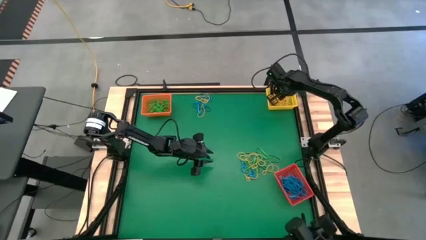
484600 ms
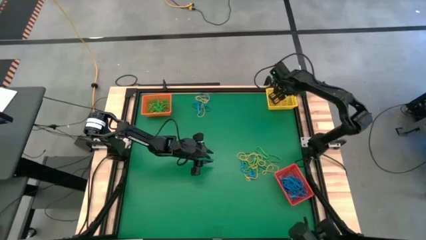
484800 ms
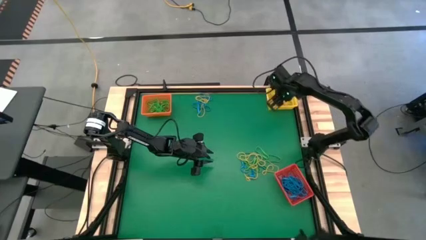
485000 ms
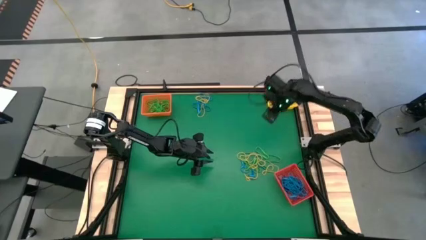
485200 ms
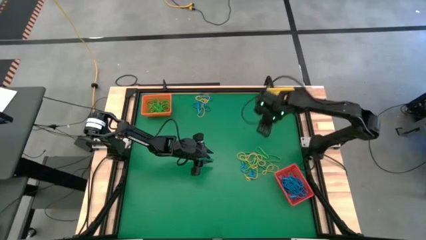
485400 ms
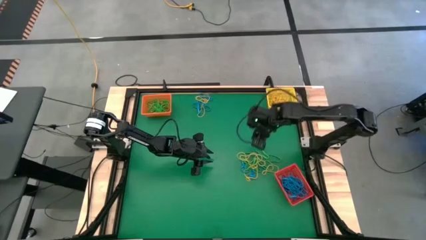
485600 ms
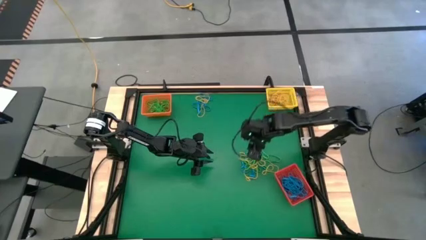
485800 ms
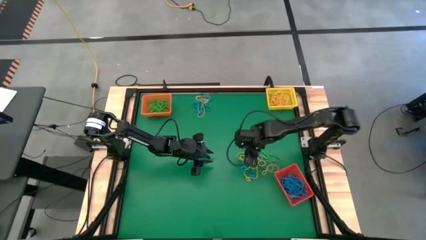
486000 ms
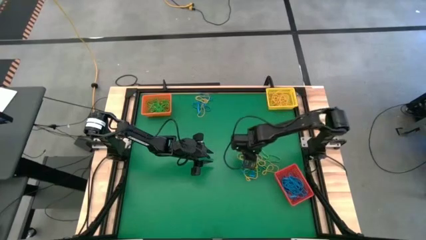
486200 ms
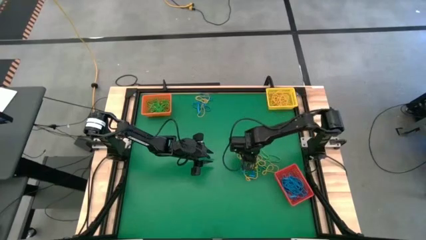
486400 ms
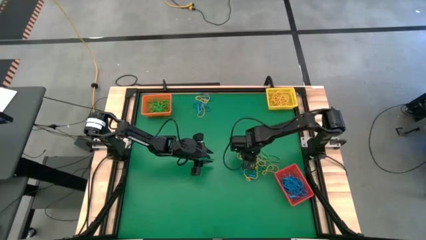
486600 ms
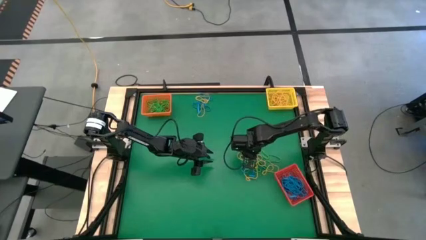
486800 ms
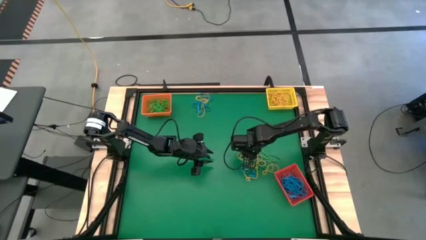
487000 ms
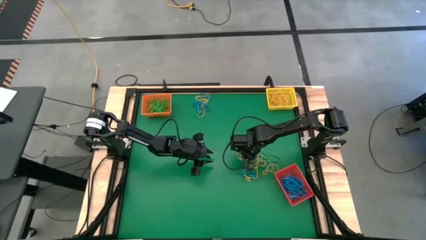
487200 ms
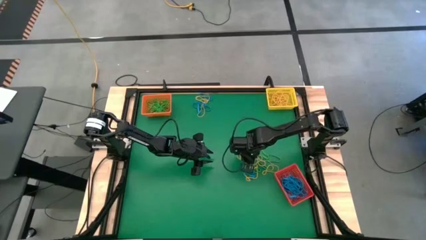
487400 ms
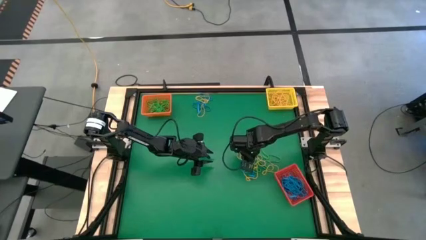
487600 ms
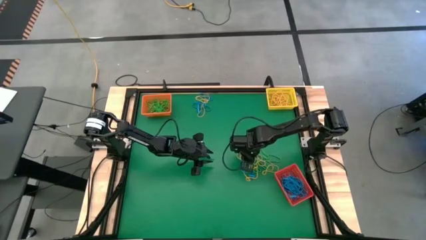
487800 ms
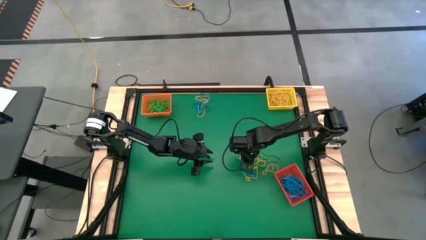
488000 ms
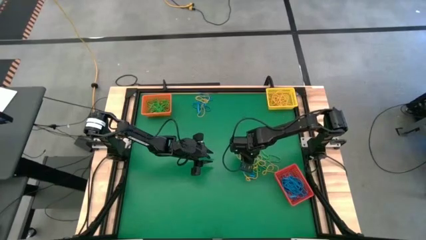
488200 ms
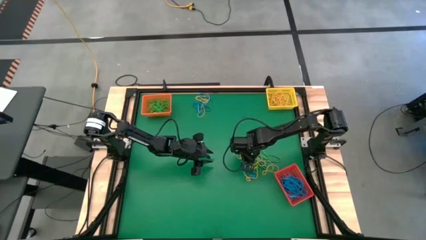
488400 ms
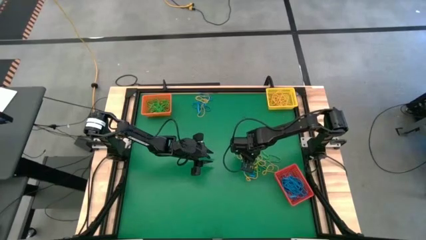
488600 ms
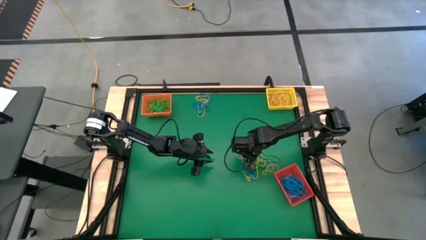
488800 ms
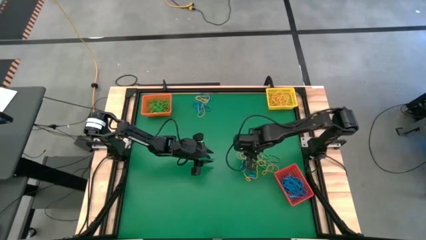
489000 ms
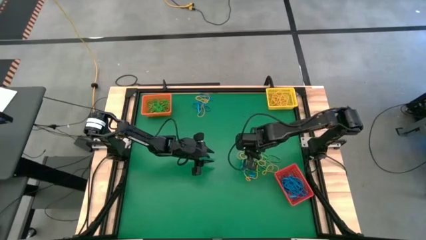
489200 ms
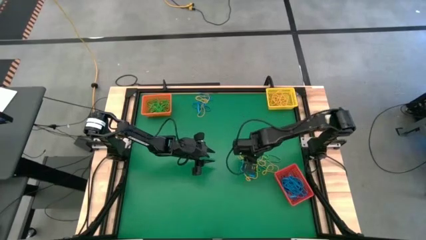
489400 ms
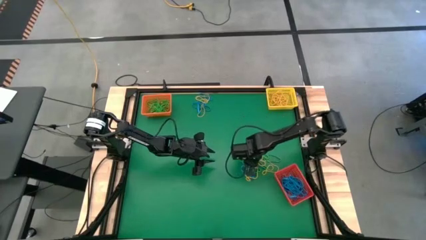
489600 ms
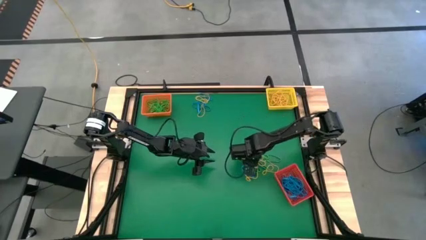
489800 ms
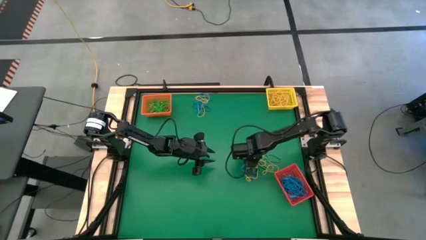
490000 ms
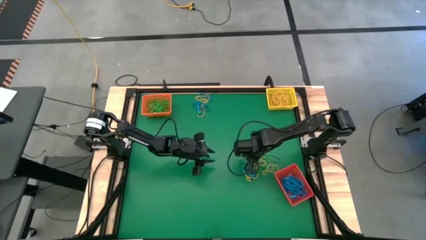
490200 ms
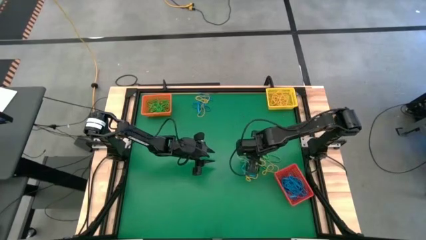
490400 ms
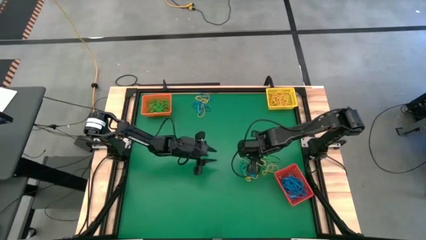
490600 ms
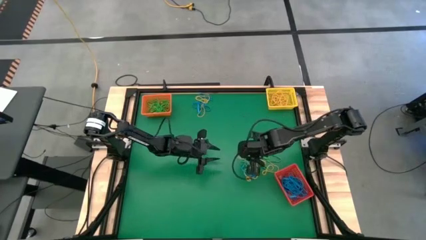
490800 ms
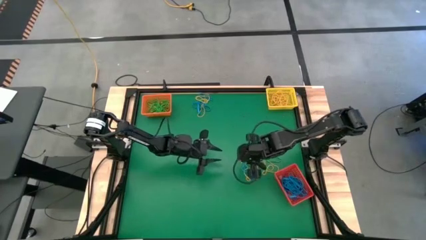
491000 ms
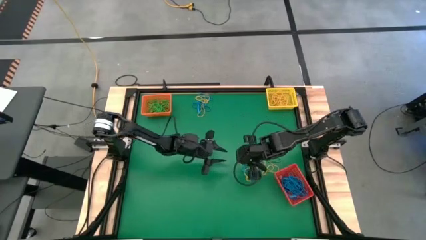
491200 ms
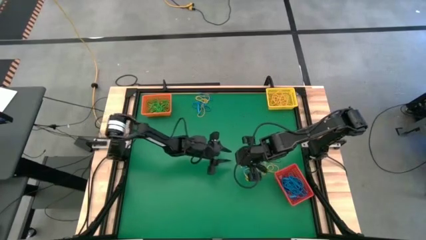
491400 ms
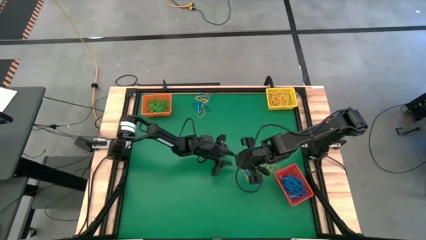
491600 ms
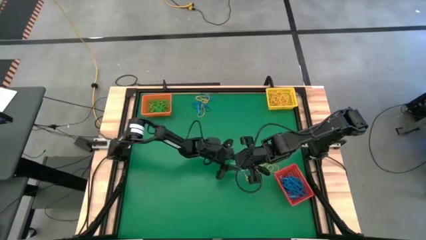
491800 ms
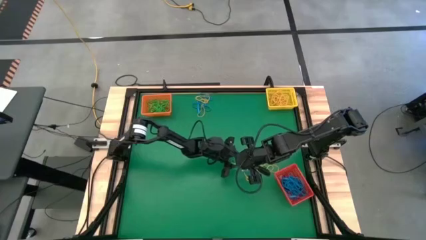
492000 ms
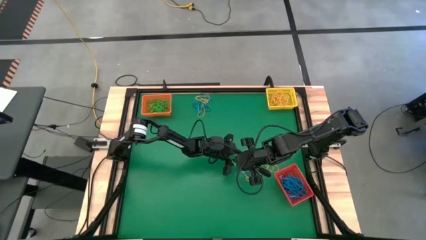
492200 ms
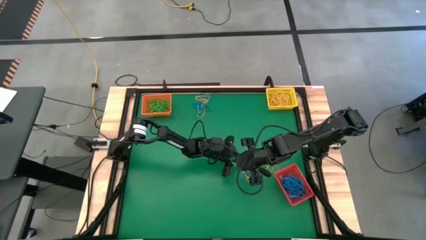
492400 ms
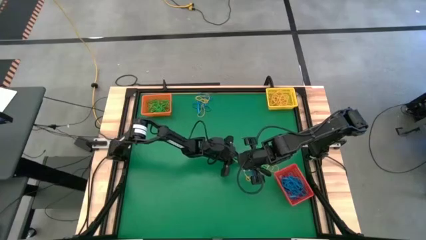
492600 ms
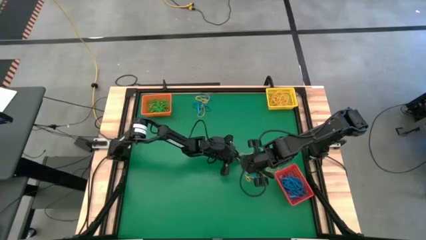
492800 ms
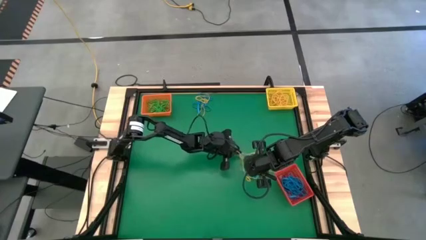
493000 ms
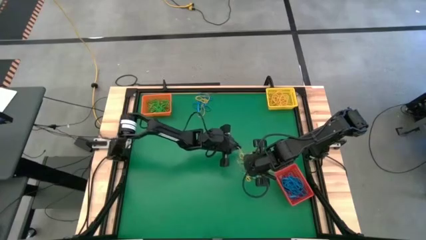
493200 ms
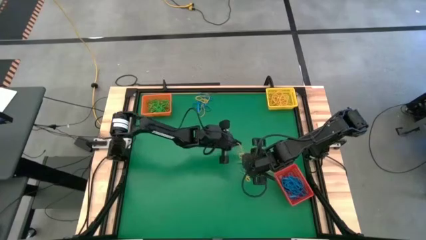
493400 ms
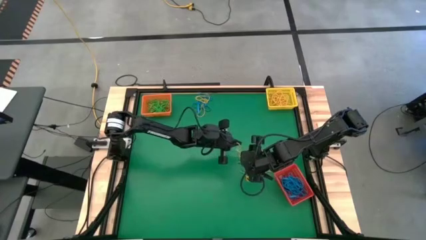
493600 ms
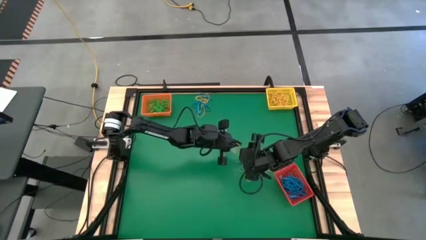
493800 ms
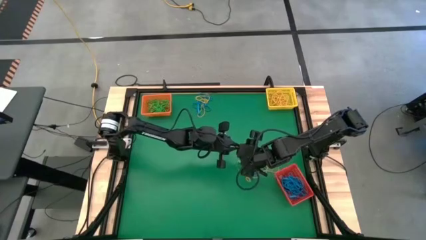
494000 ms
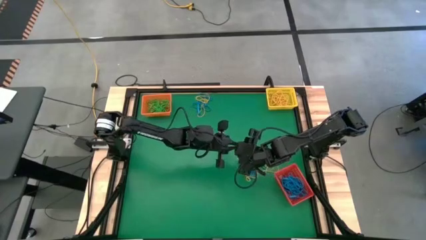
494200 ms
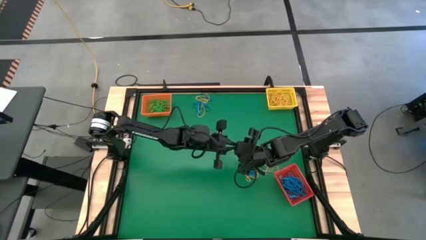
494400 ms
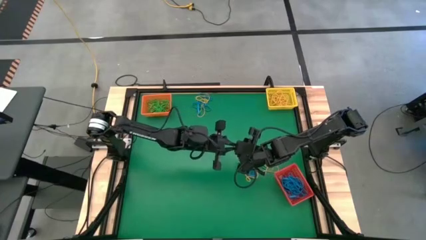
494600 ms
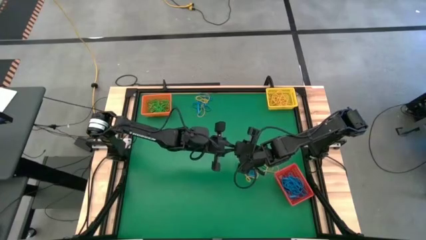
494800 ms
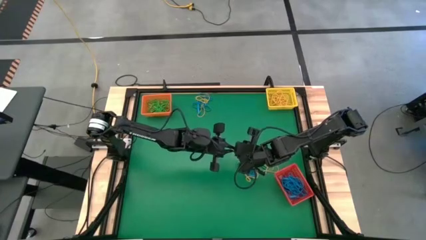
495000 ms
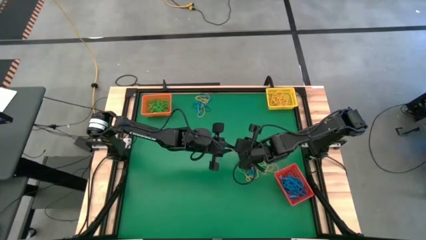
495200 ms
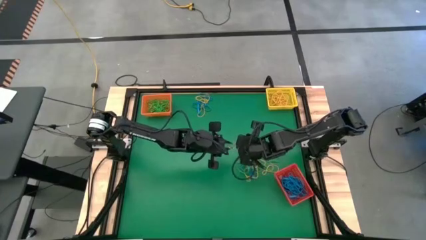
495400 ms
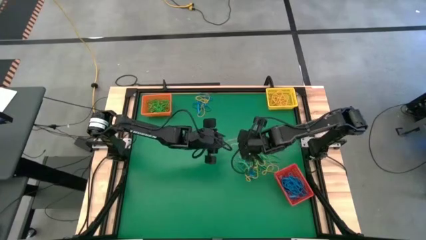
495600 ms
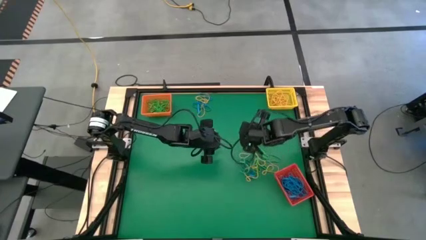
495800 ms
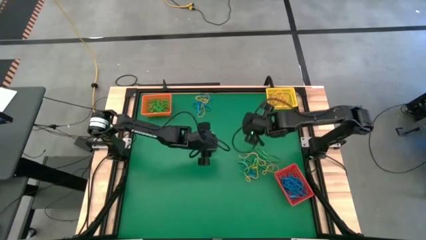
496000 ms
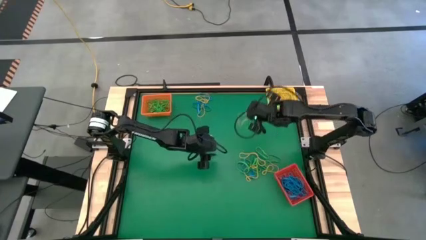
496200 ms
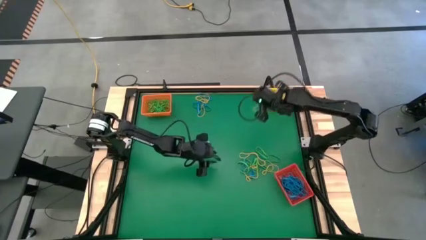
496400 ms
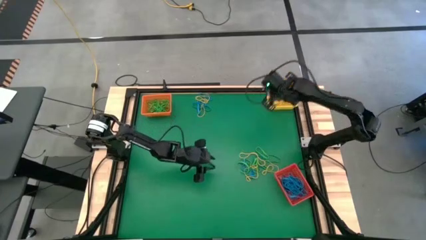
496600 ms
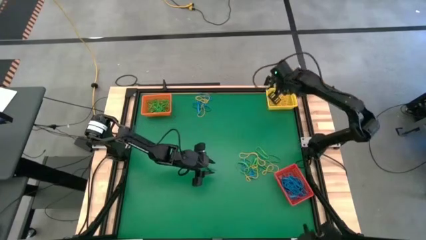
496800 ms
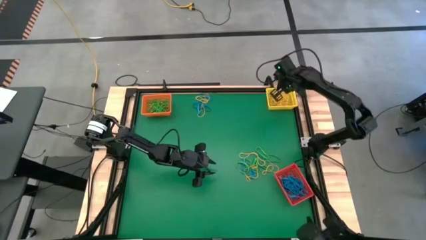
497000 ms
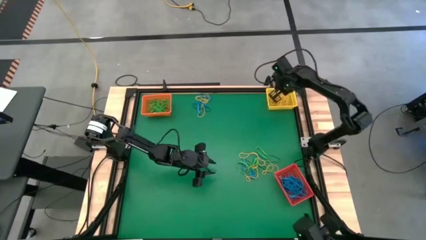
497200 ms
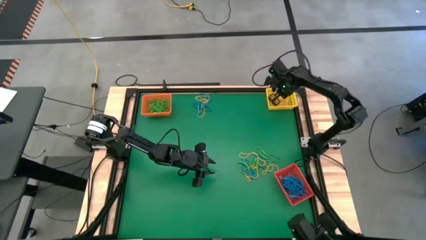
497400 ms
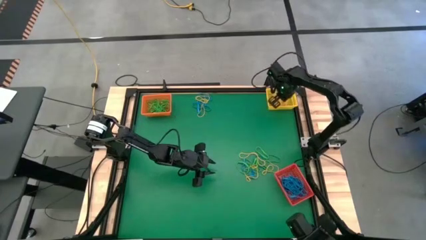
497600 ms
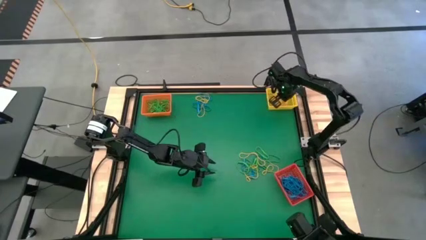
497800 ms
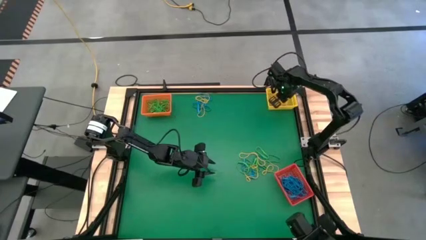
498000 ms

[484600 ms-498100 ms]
Task: Sort rubber bands into baskets
Put the yellow rubber band into the yellow bin

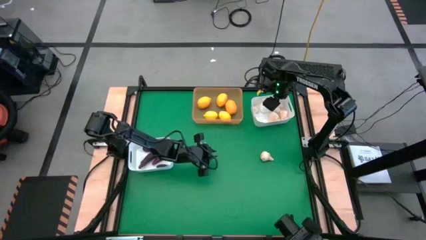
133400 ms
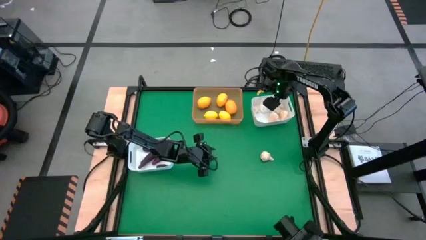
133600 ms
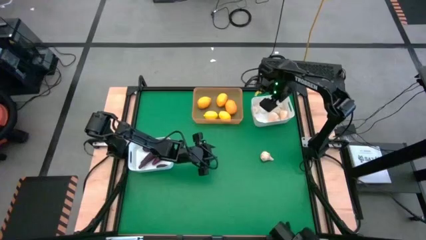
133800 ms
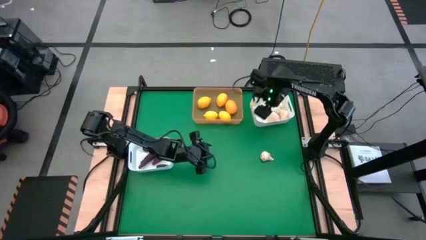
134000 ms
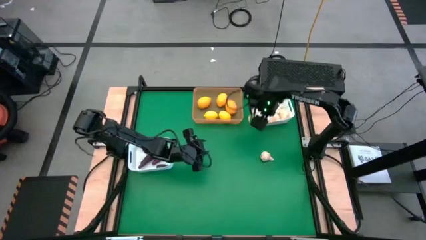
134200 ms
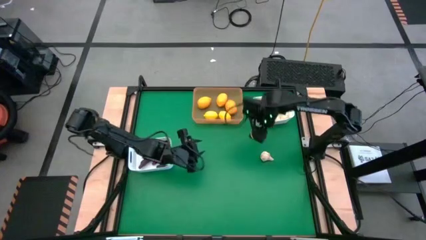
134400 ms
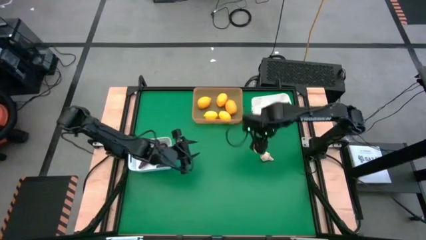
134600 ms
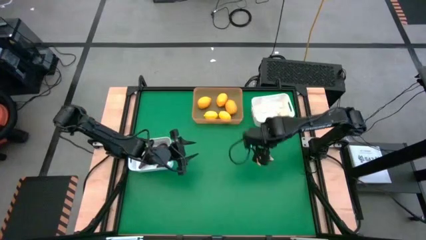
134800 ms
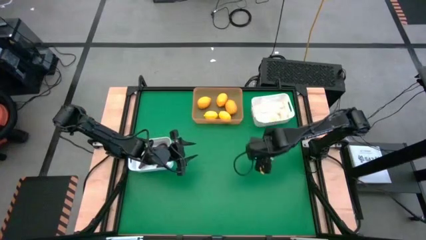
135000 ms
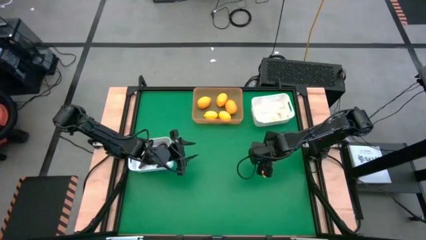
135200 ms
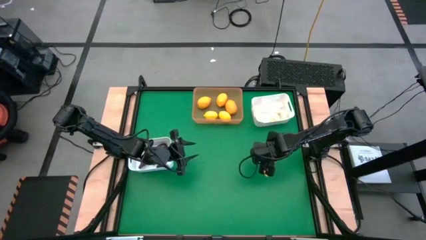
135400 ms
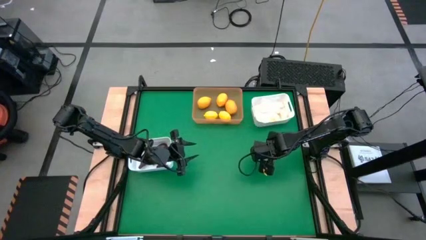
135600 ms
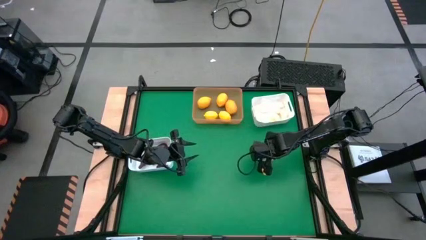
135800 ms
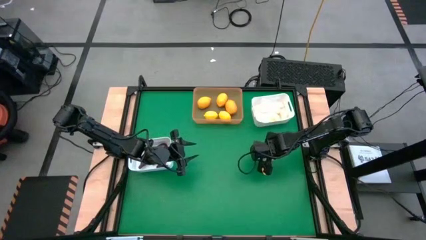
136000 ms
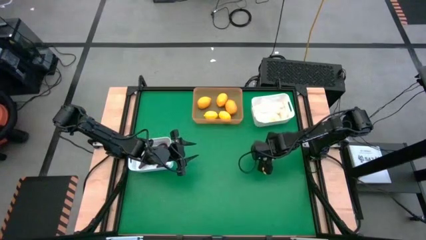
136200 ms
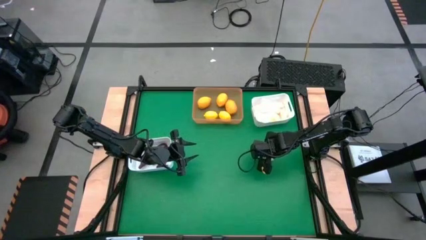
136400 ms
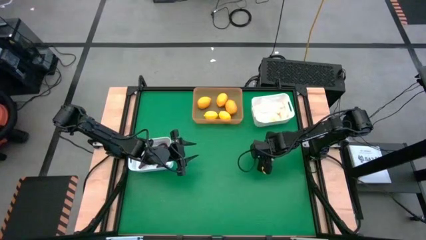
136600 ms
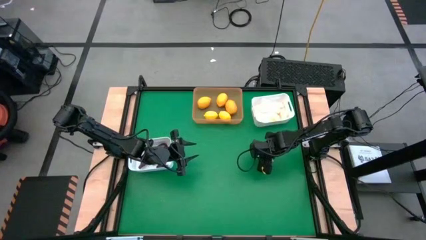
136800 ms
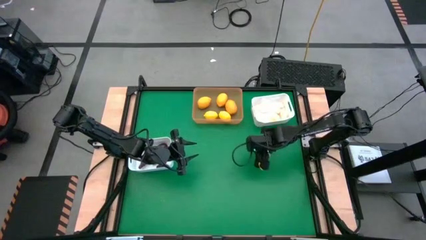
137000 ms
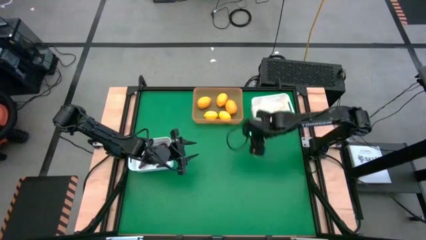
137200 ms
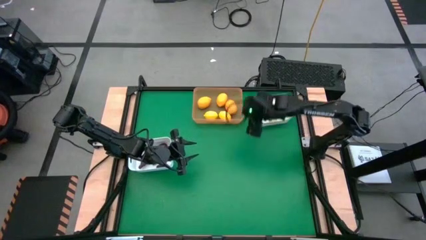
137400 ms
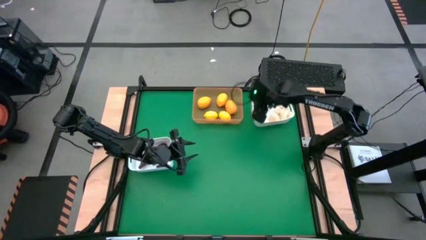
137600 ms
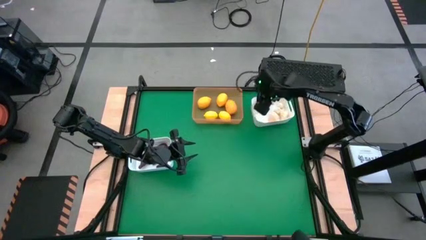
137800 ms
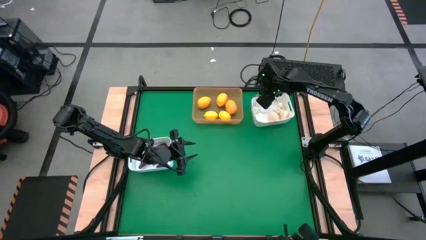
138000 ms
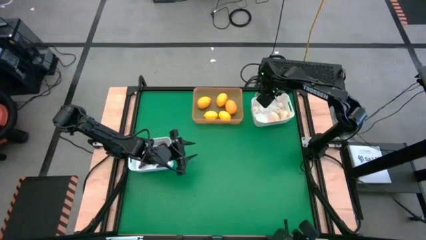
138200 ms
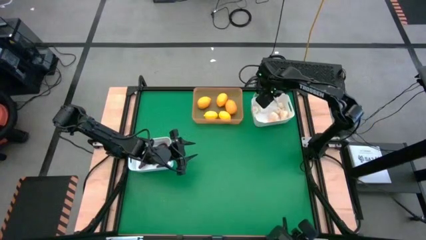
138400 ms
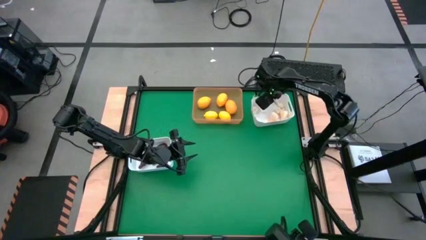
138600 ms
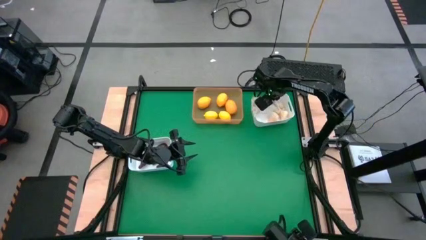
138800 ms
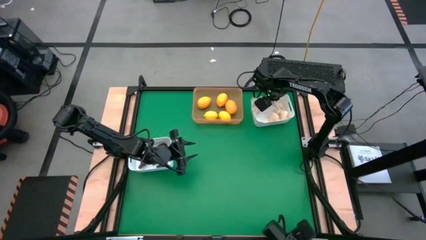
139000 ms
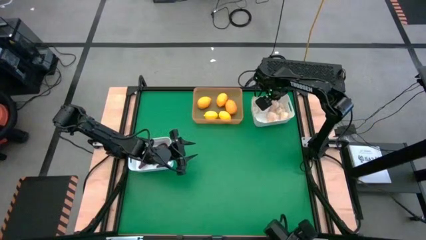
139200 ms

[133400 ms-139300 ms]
Task: Sort produce into baskets
Put the garlic into the right white bin
